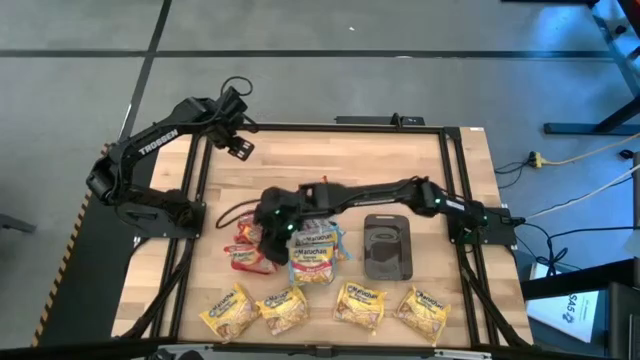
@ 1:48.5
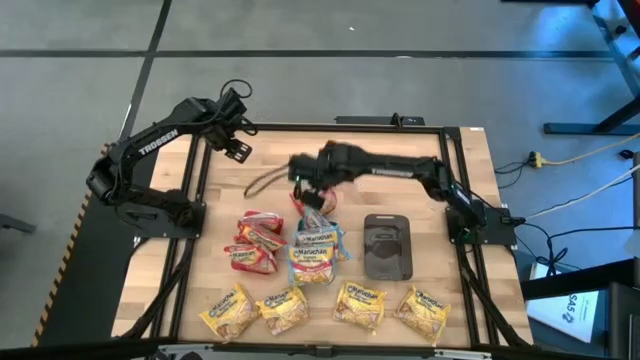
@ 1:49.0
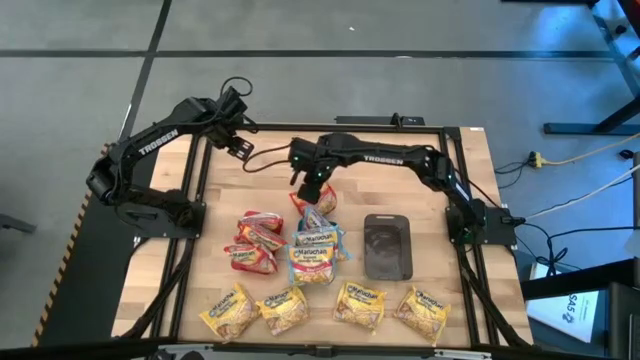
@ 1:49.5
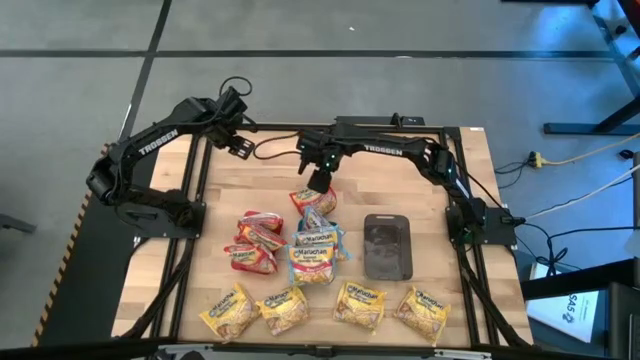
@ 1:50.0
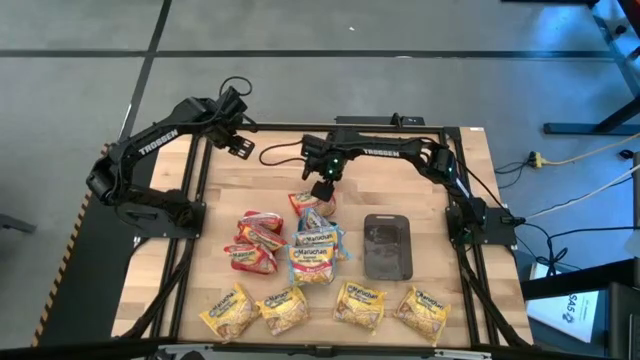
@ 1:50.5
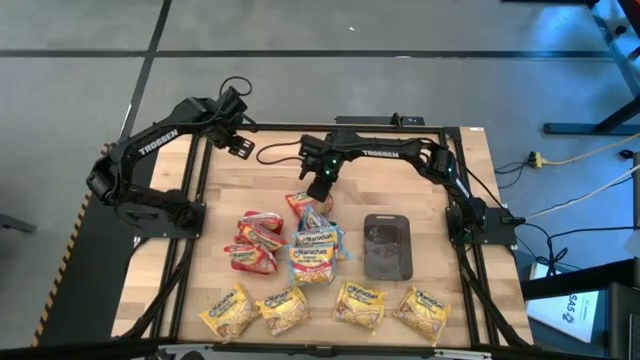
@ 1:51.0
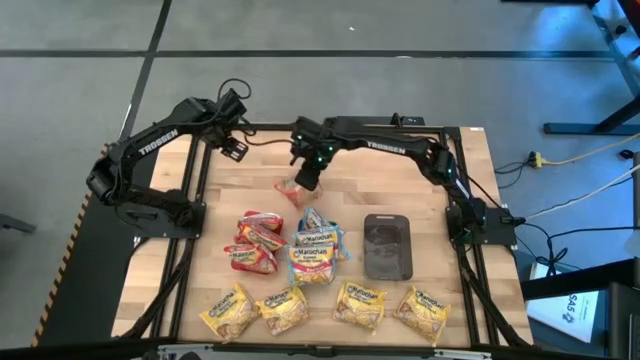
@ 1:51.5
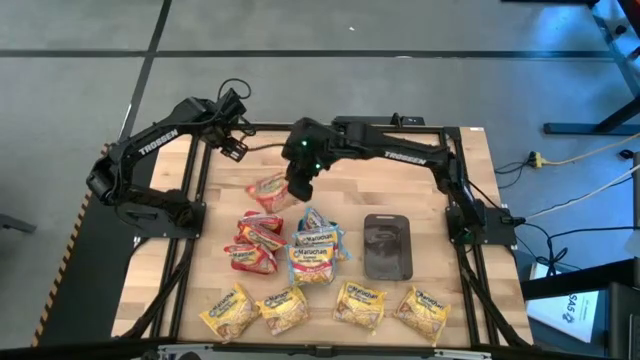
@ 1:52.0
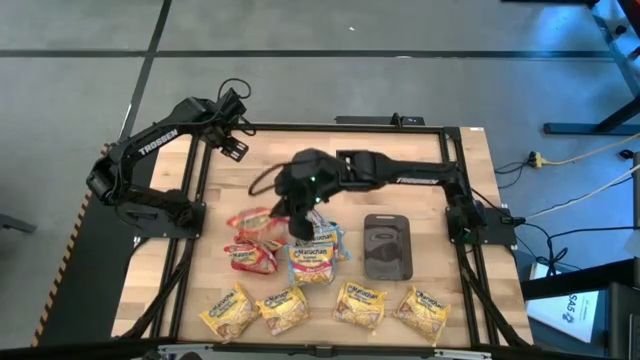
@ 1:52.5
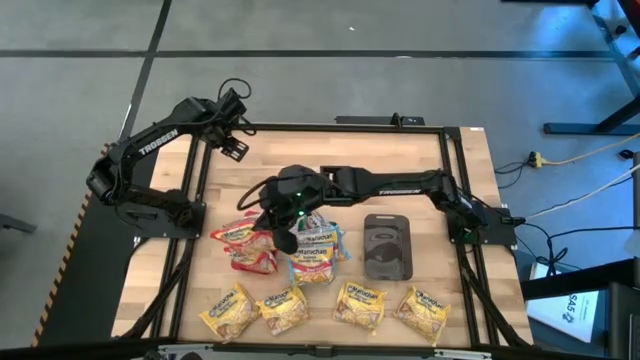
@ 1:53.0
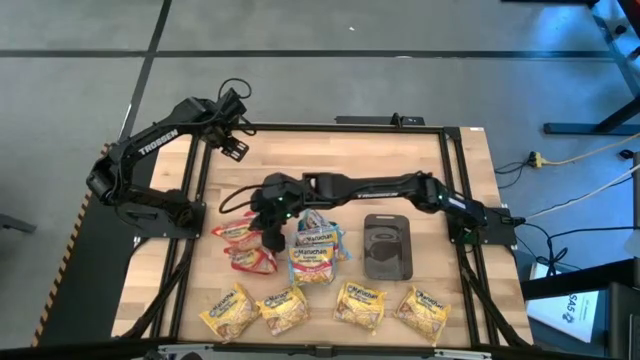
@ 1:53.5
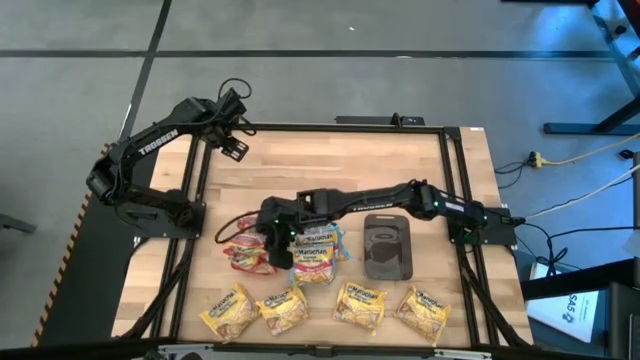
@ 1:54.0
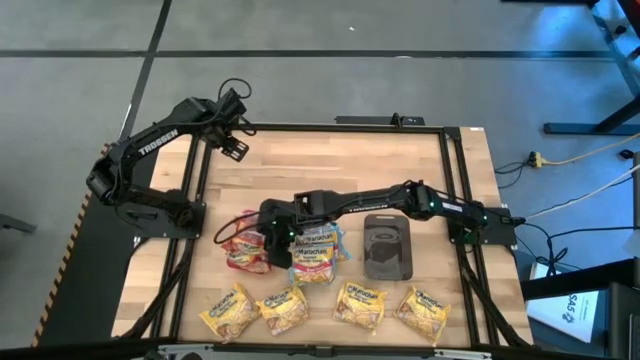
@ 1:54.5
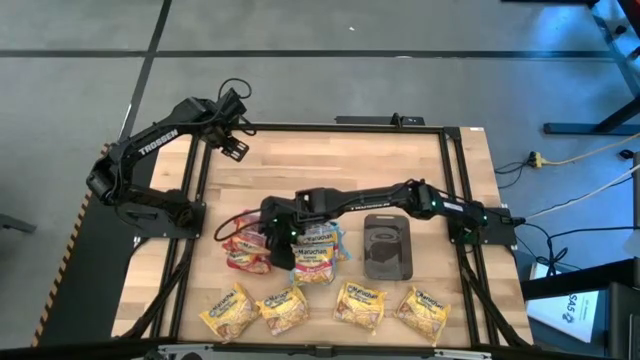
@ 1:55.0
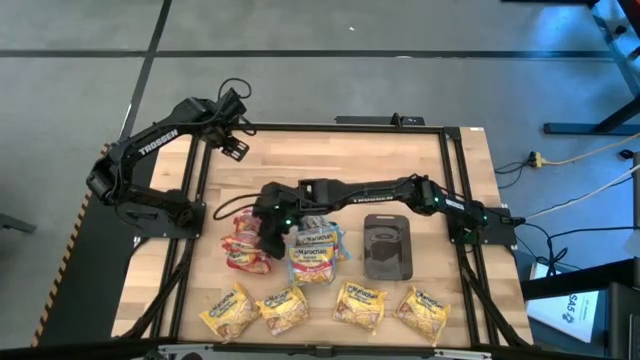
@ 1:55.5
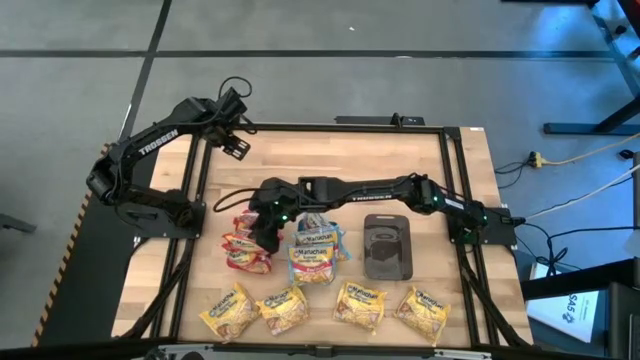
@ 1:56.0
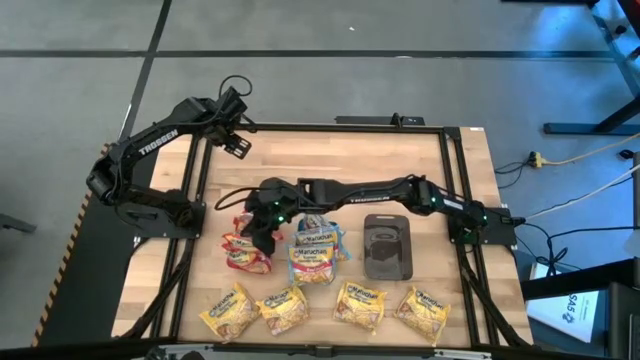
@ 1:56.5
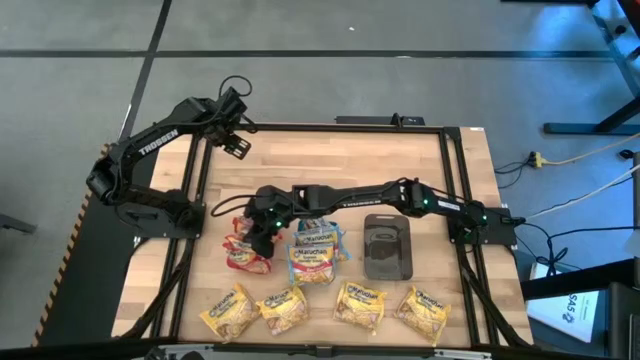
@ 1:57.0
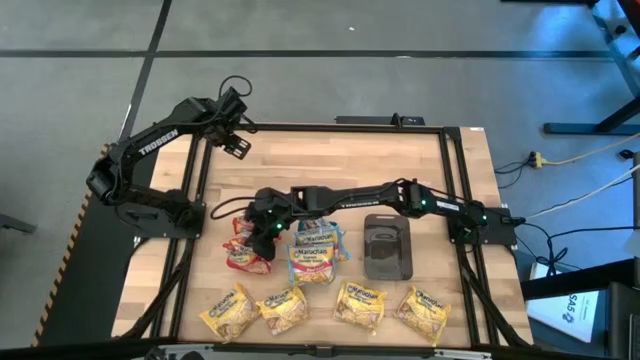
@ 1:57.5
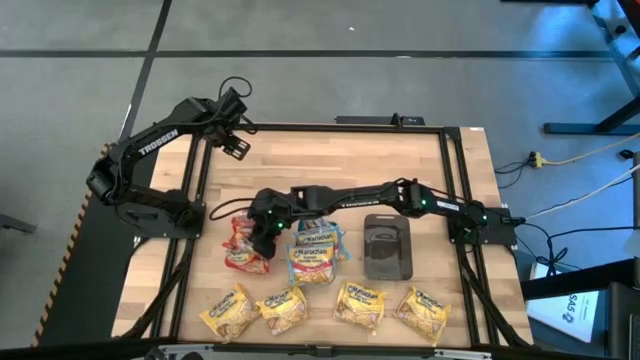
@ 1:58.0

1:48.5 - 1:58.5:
Task: Sort Maruchan noodles
Put the red noodle pack into the red bin
